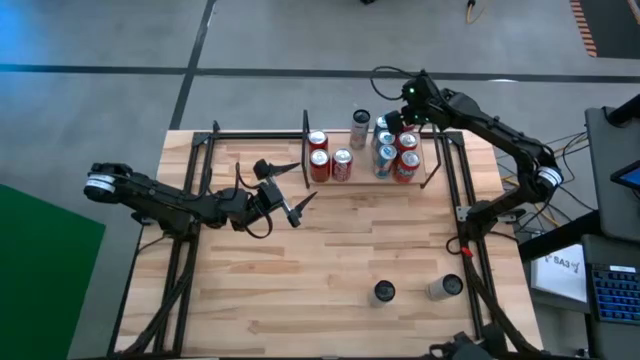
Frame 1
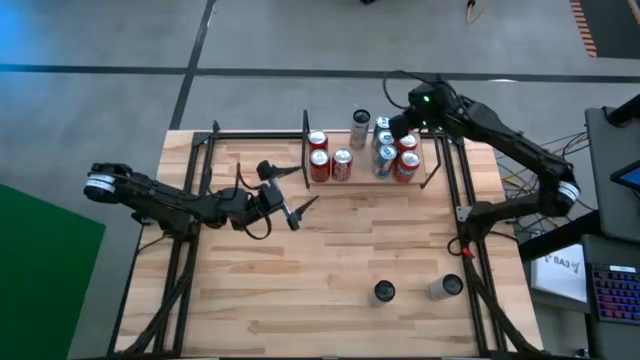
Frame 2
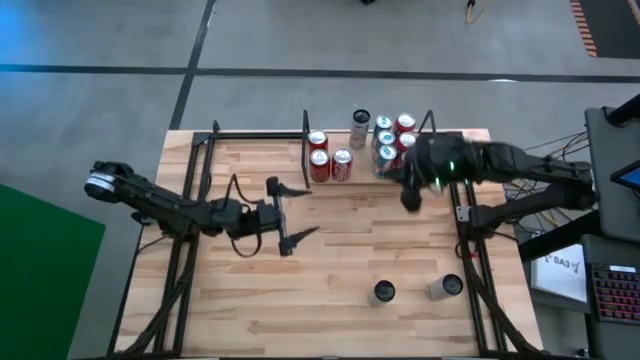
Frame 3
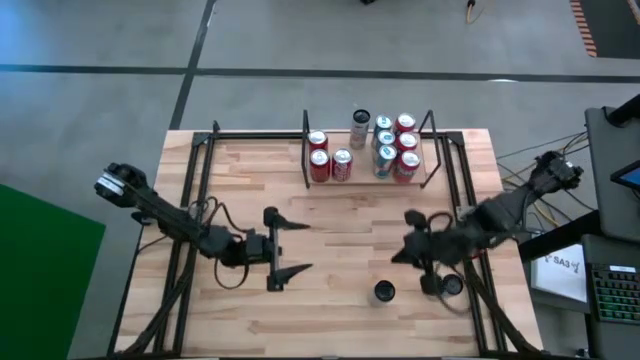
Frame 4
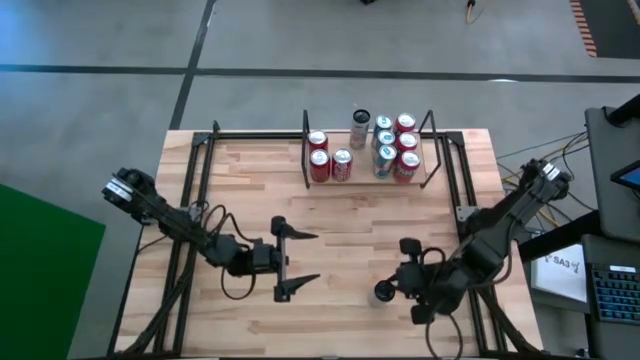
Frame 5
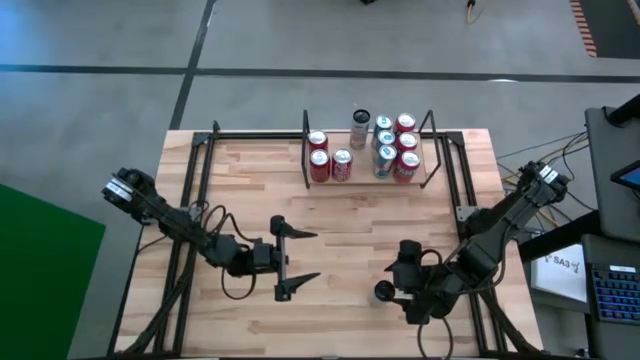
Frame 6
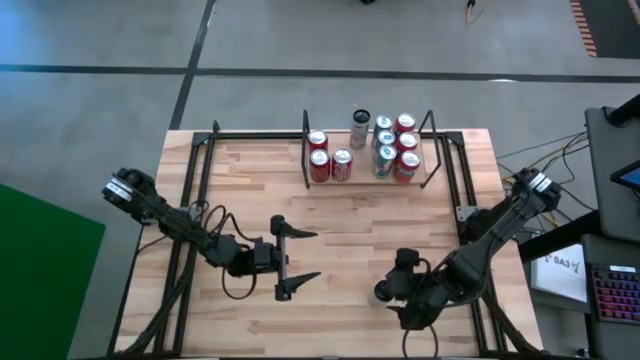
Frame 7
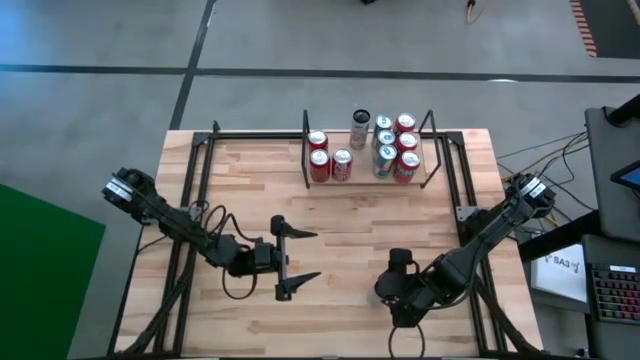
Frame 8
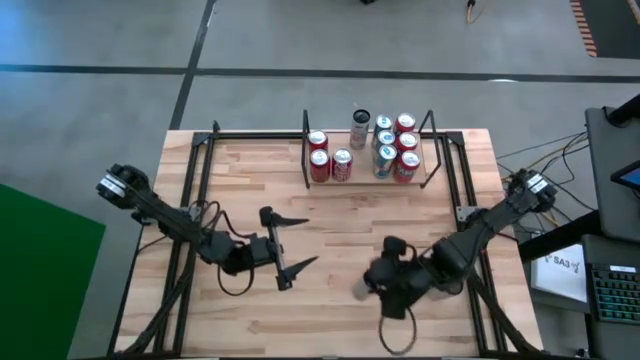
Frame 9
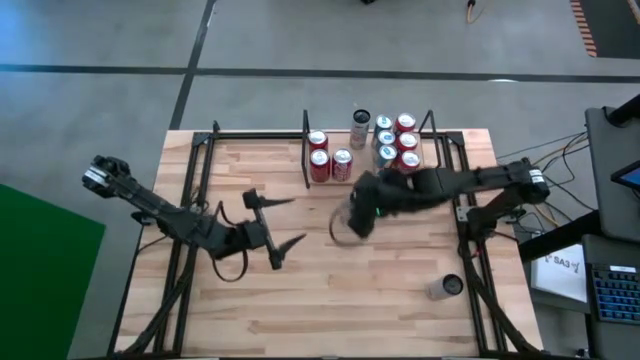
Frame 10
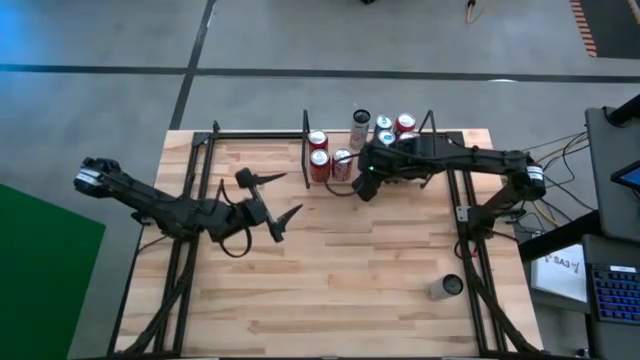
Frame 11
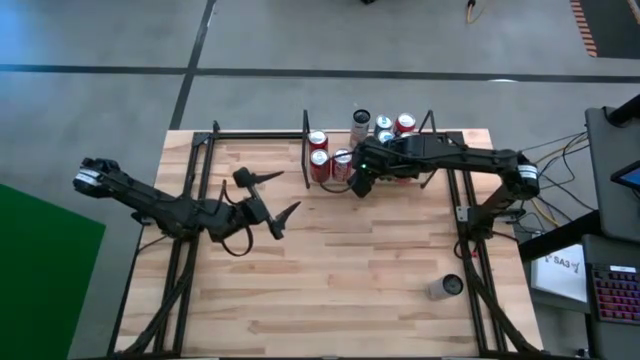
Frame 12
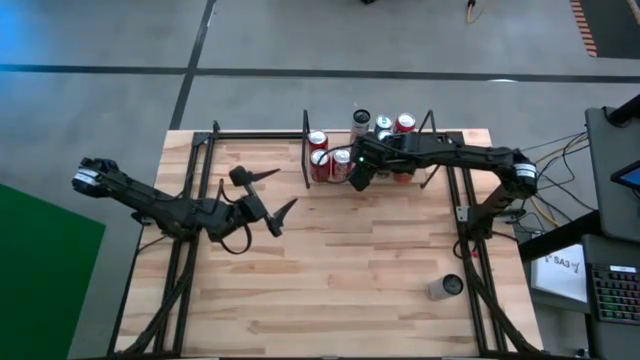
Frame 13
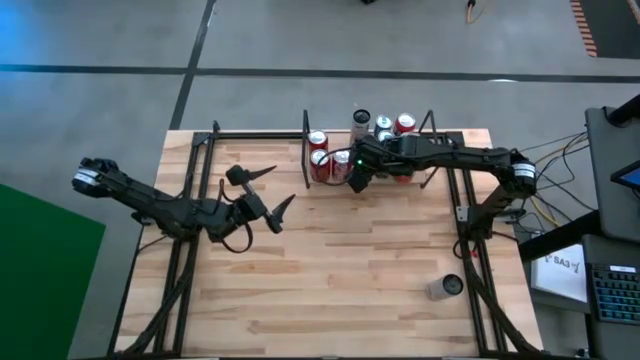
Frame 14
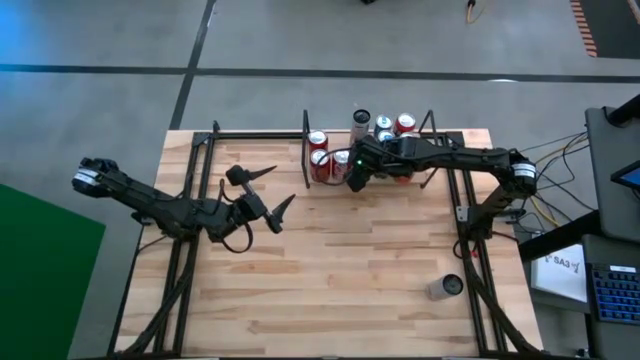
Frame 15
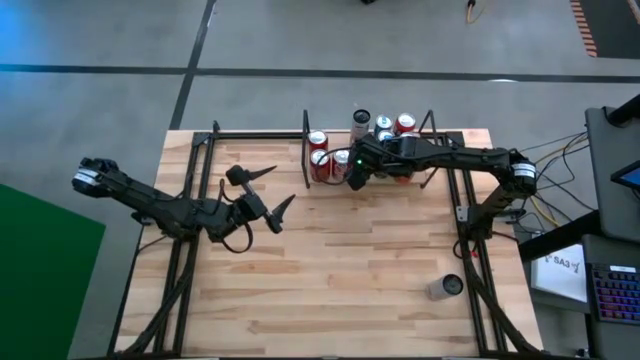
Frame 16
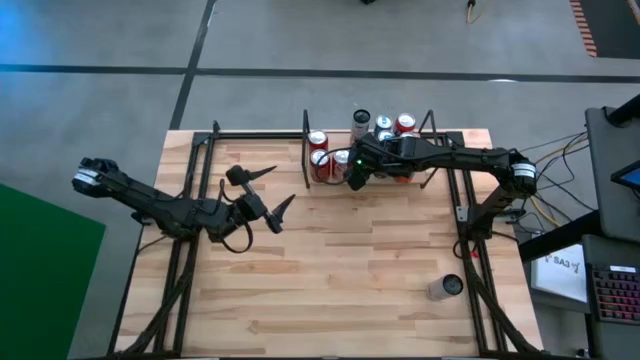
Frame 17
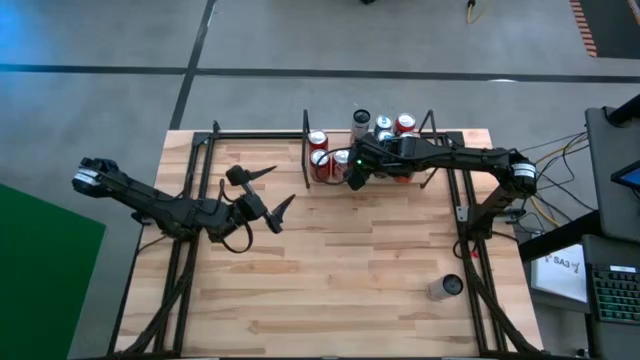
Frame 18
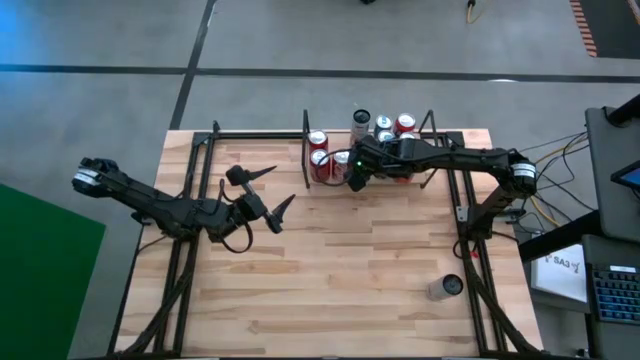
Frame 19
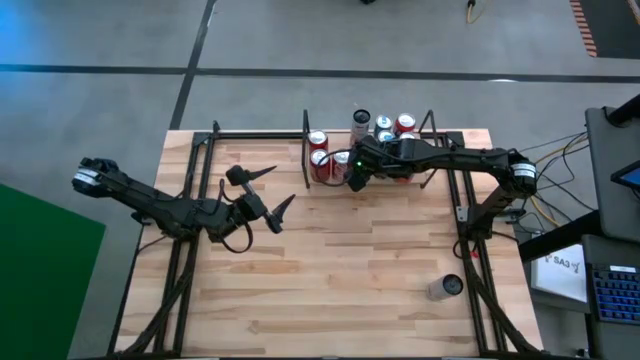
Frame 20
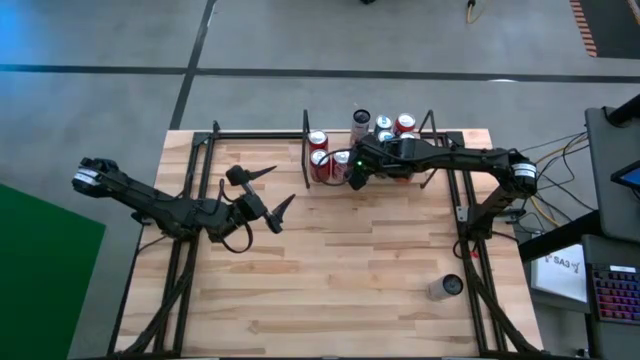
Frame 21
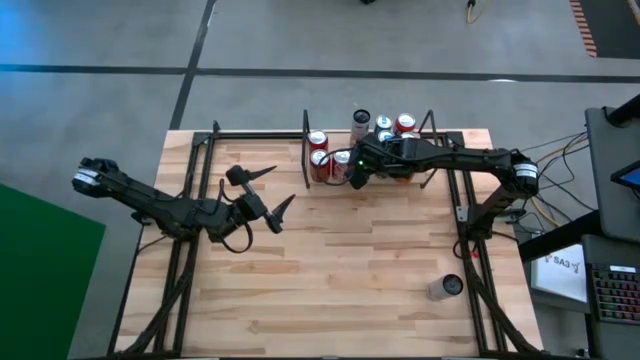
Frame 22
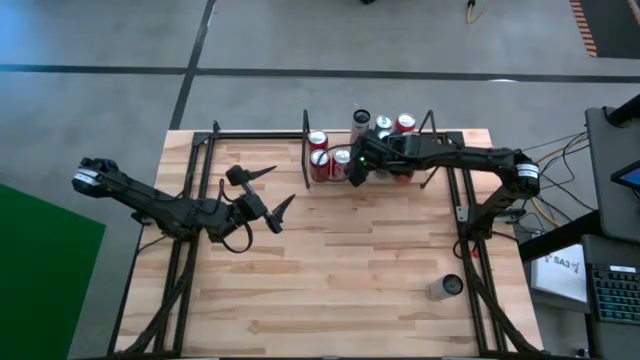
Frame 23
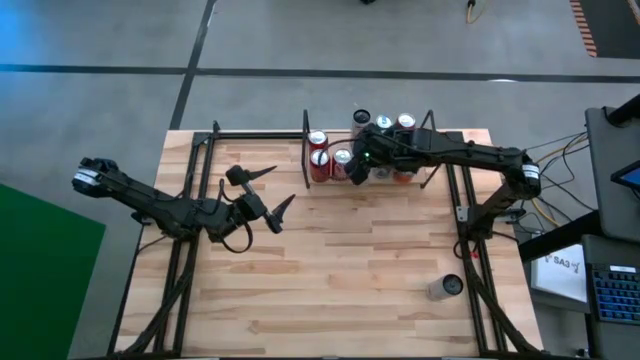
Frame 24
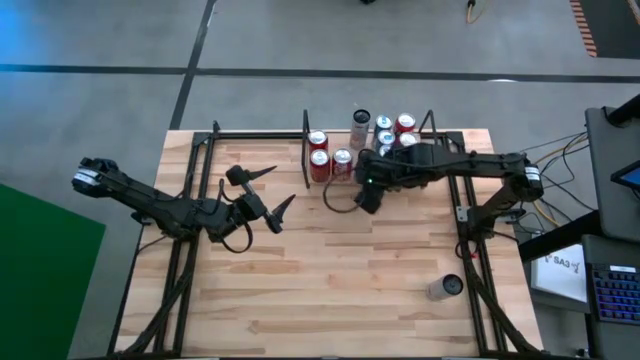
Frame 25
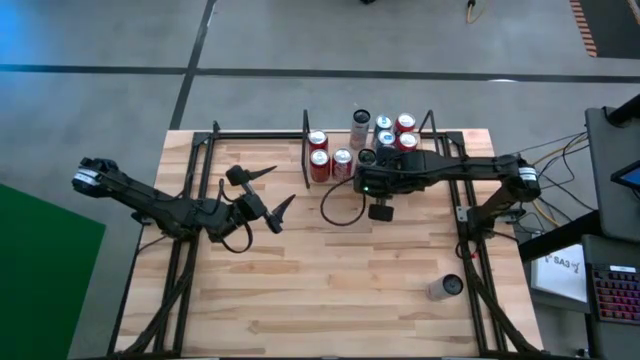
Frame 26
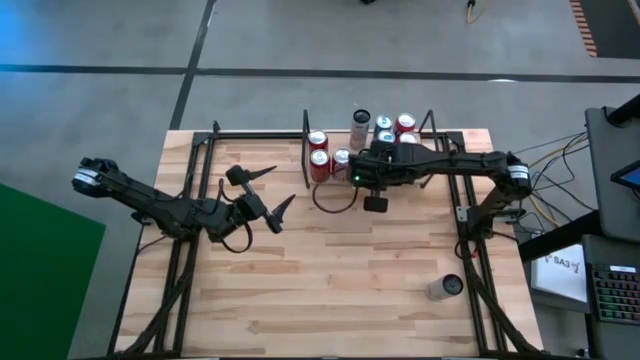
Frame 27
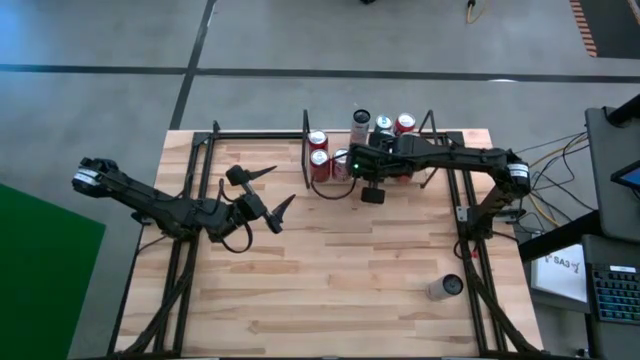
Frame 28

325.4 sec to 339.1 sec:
Task: Place canned beverage on shelf
Put the left white and pink soda can on the shelf

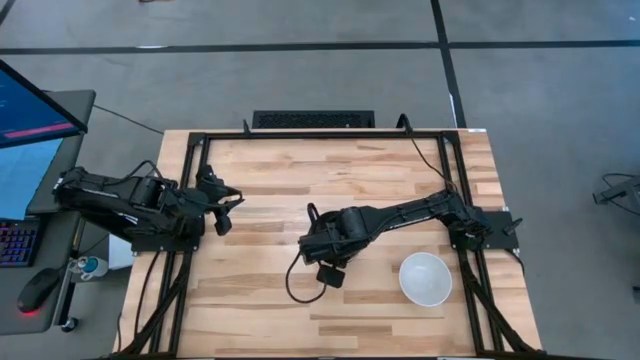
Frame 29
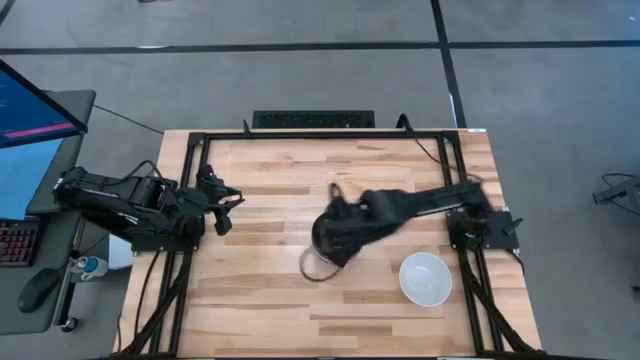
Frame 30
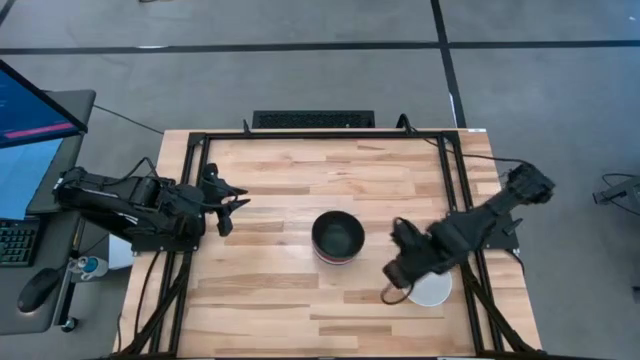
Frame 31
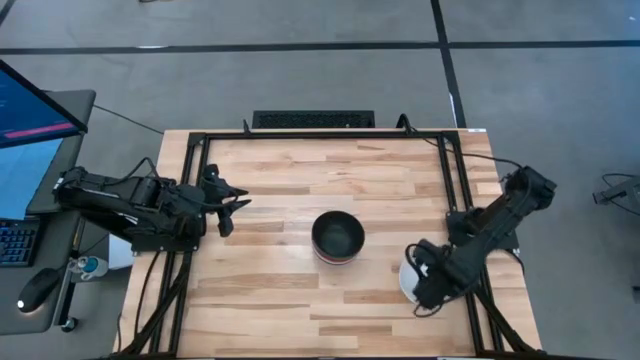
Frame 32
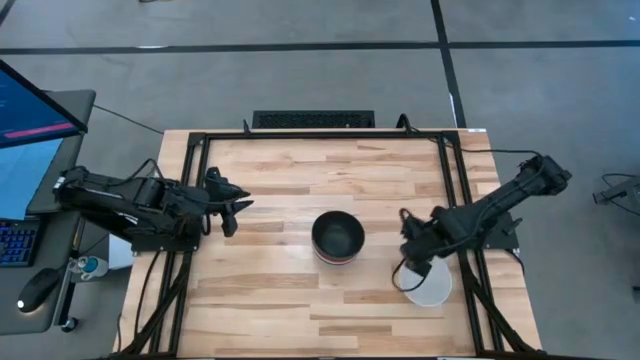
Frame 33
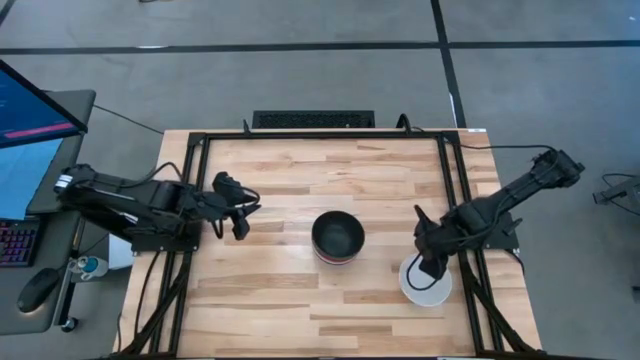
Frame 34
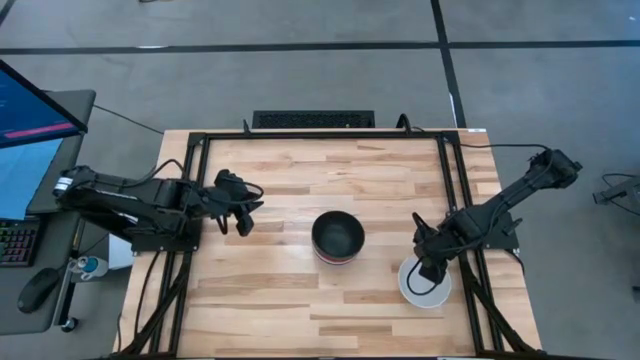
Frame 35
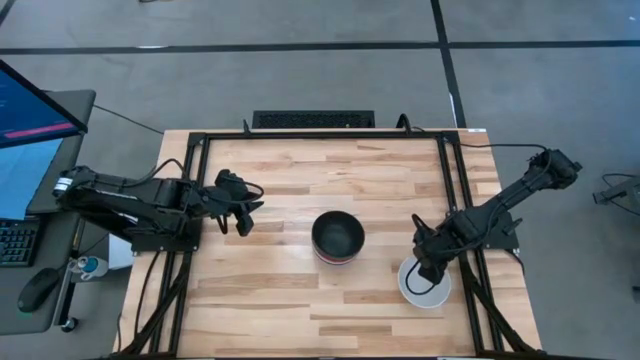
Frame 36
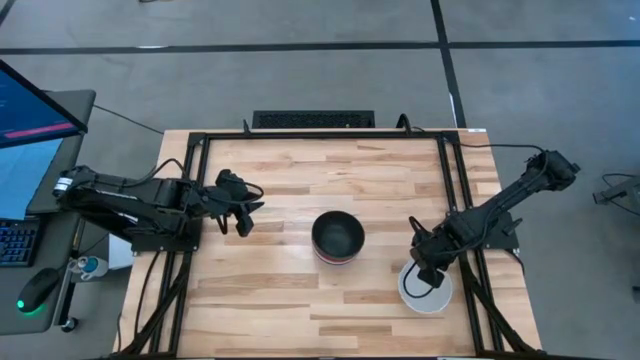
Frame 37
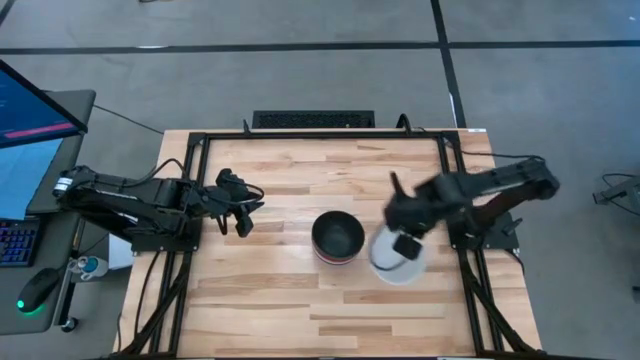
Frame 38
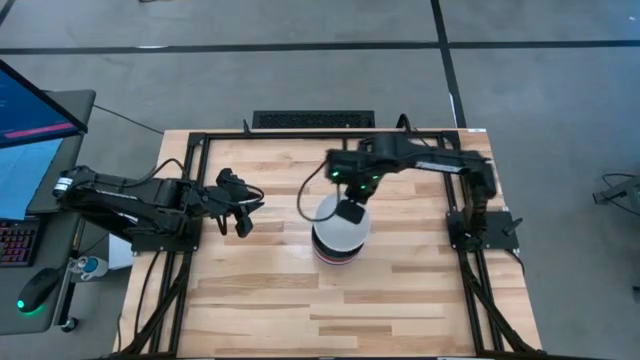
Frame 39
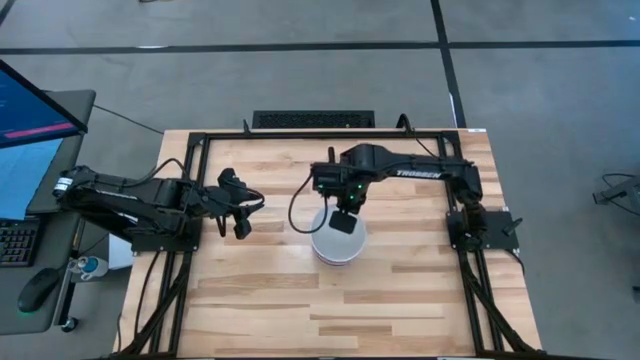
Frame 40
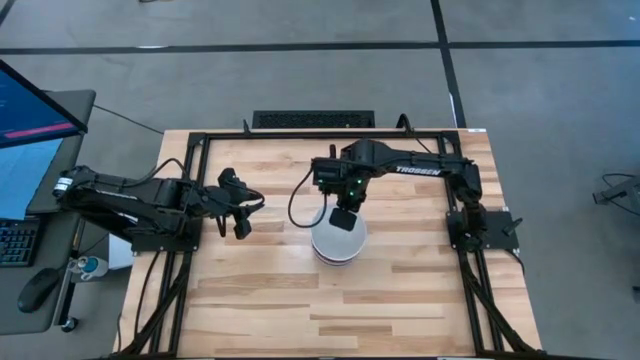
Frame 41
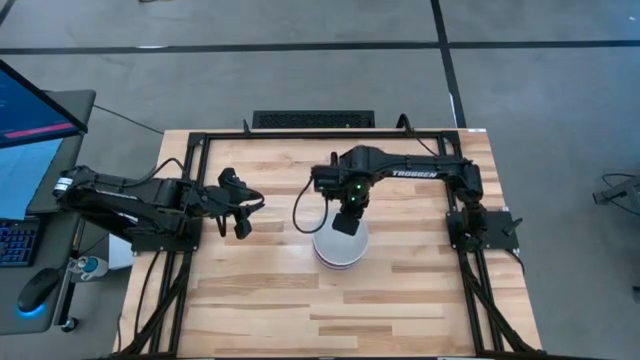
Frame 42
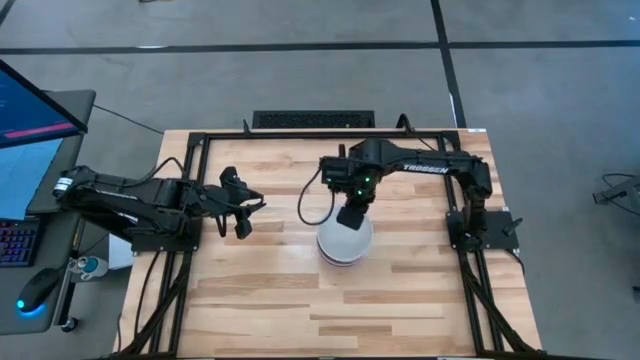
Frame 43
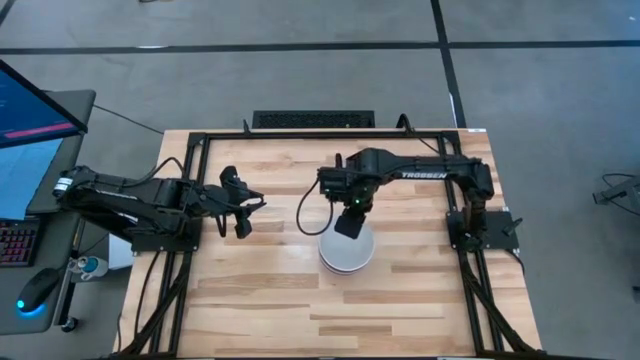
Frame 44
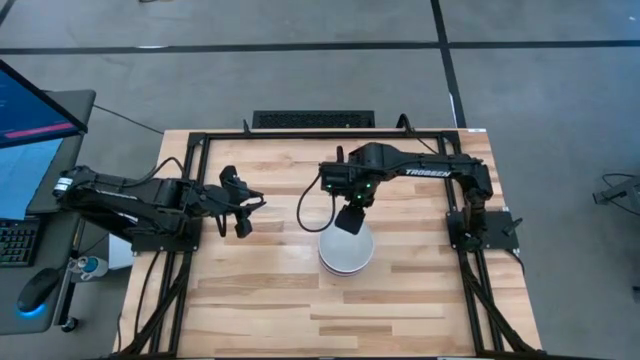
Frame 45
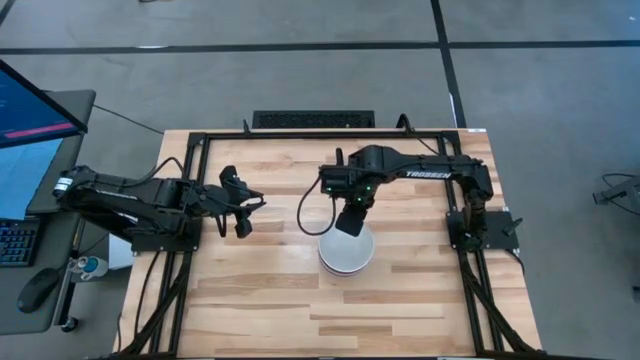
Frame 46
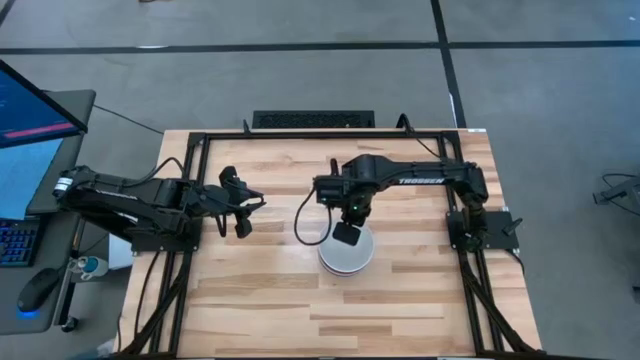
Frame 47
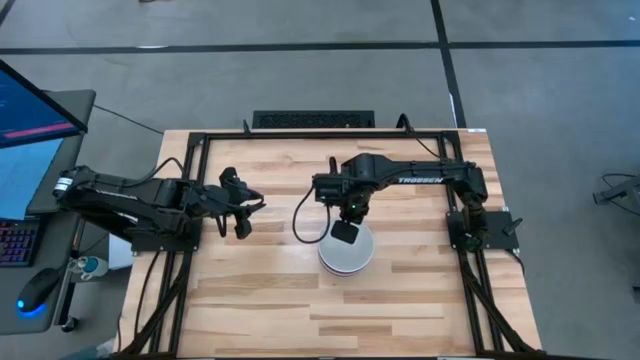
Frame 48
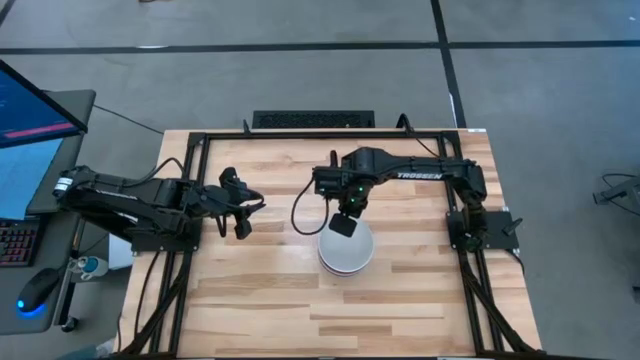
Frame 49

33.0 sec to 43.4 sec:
Task: Nest bowls inside each other
Stack the white bowl on top of the black bowl
